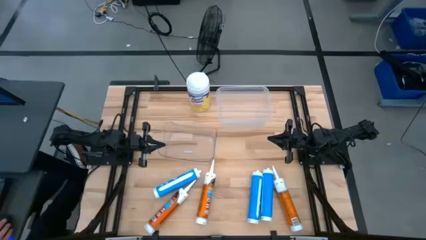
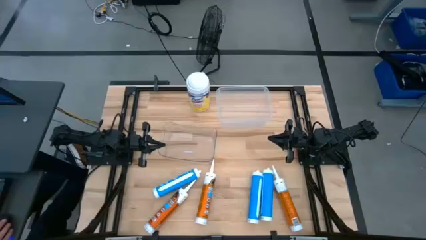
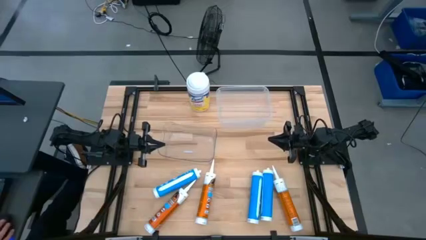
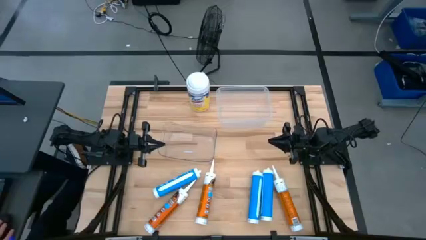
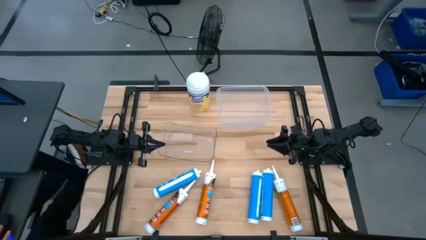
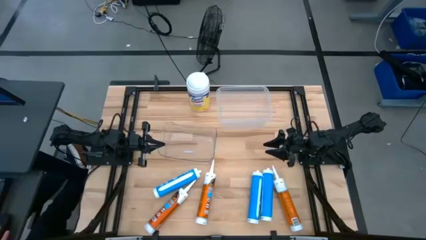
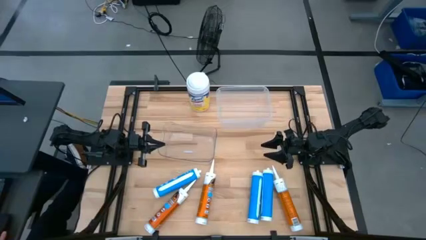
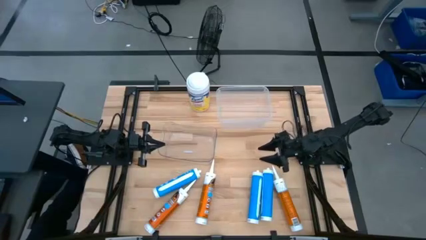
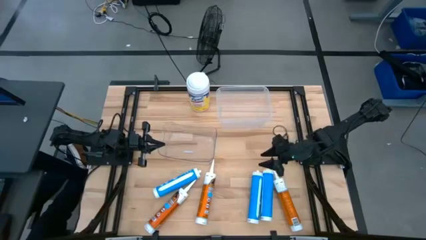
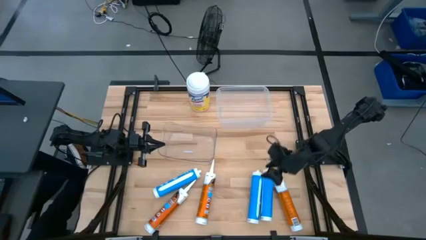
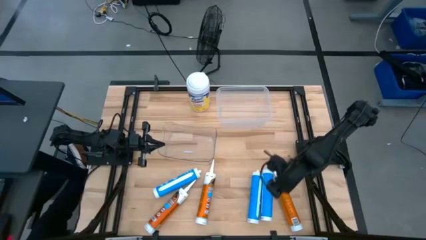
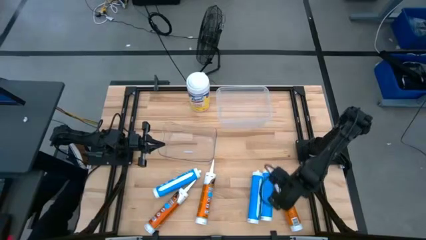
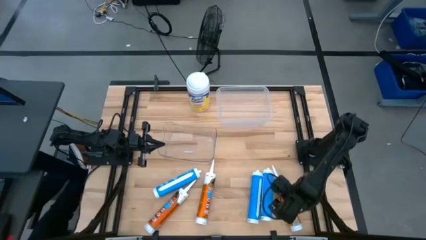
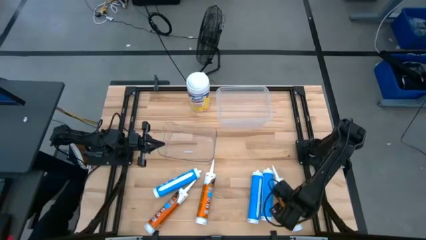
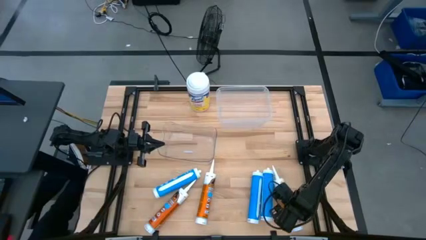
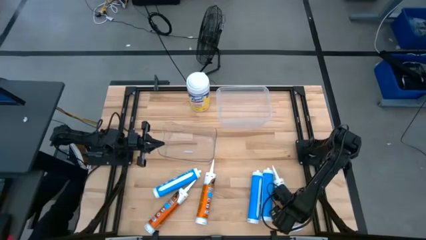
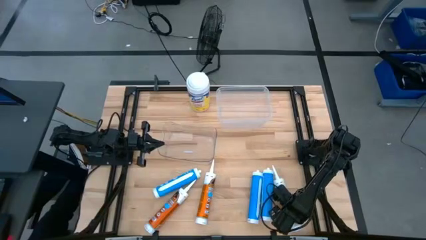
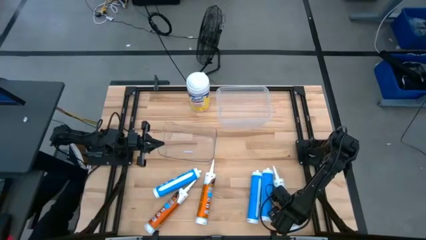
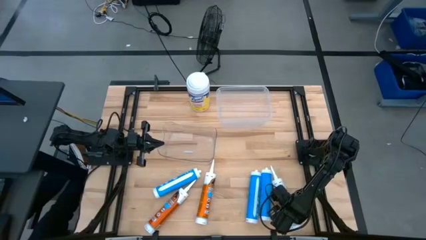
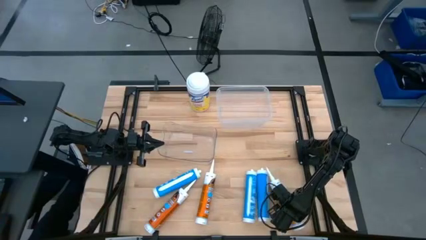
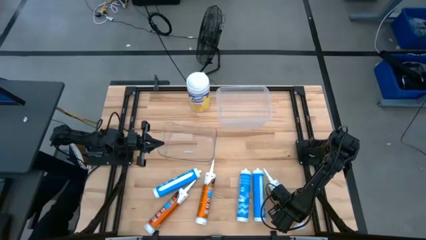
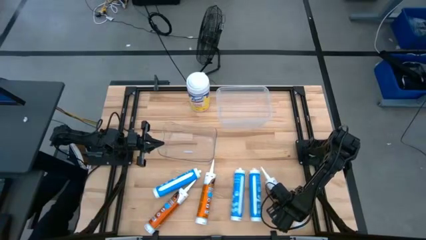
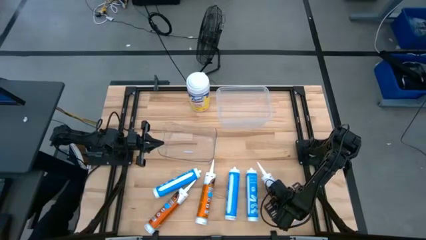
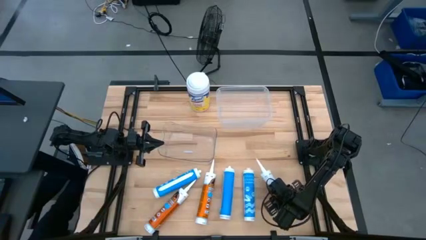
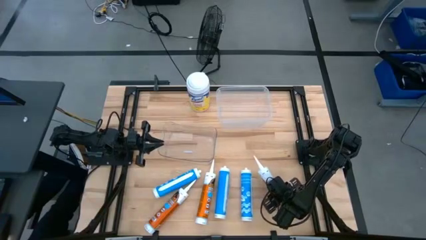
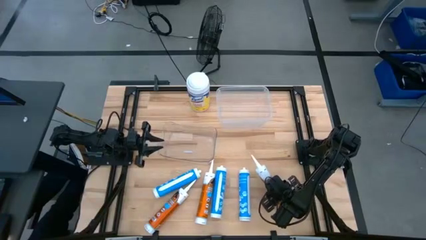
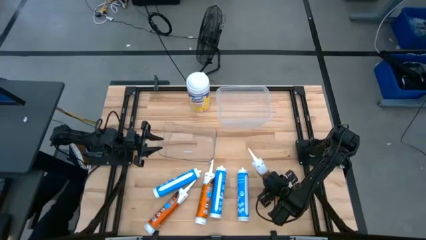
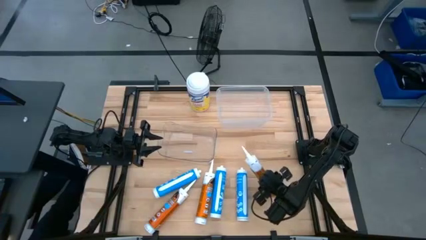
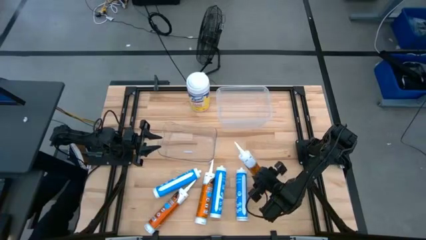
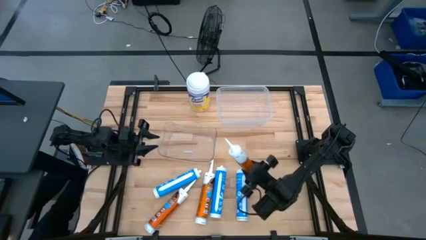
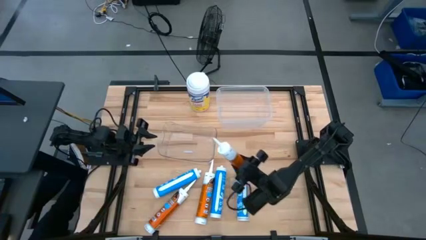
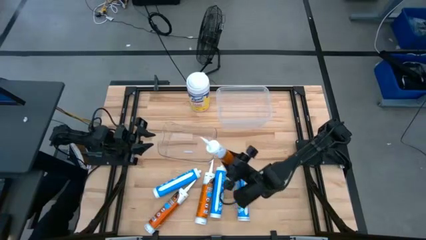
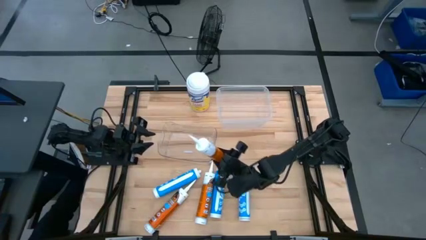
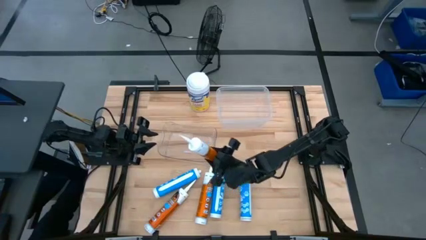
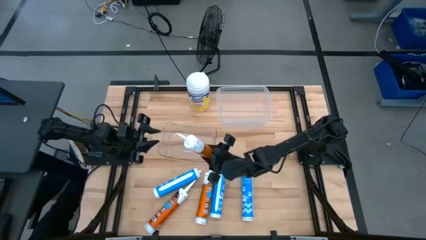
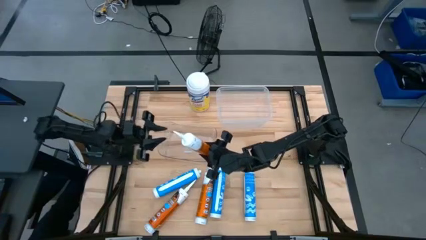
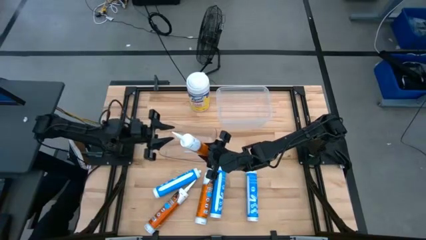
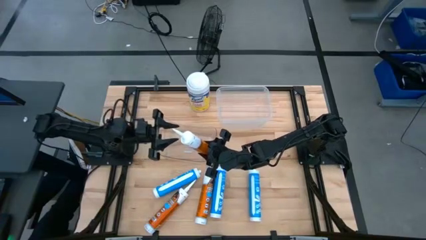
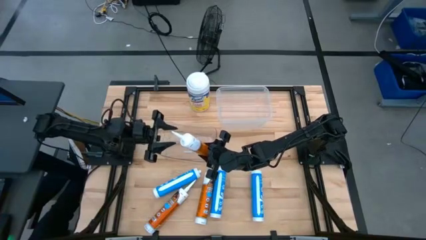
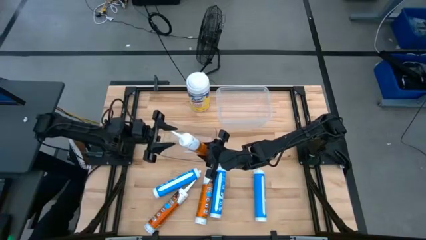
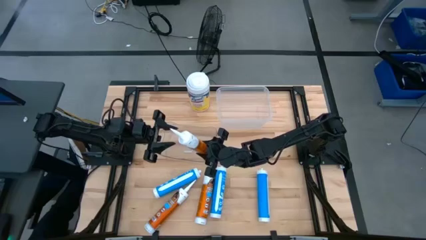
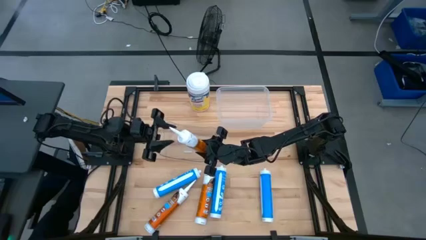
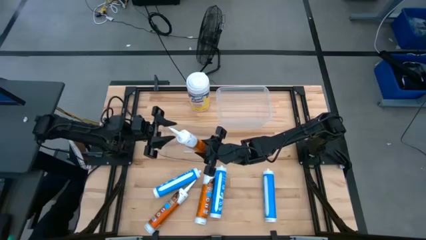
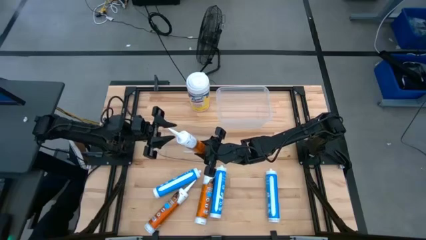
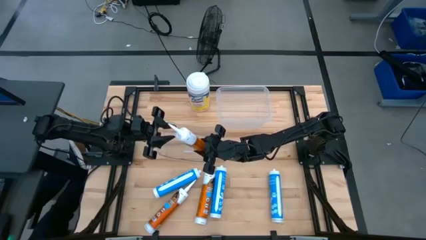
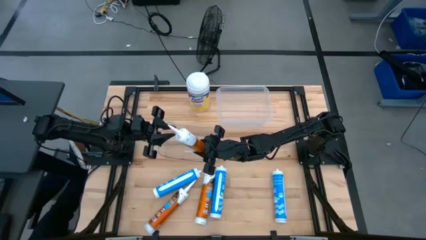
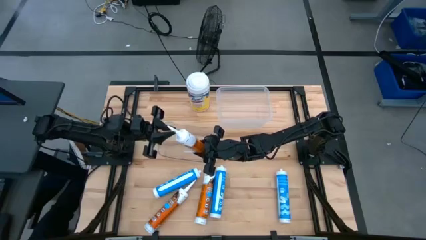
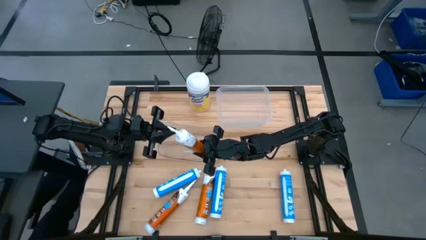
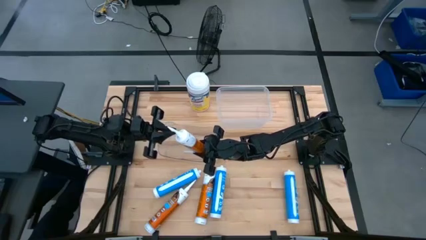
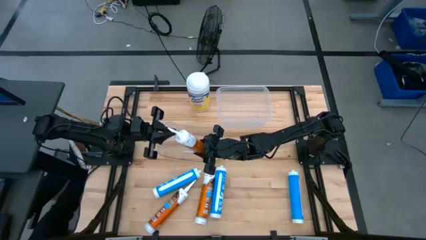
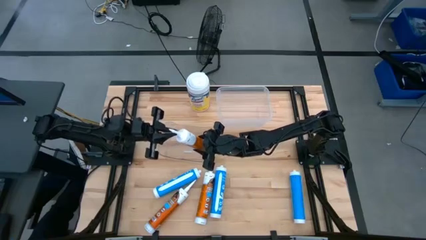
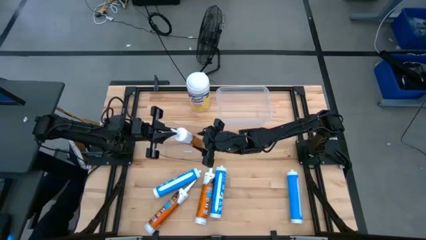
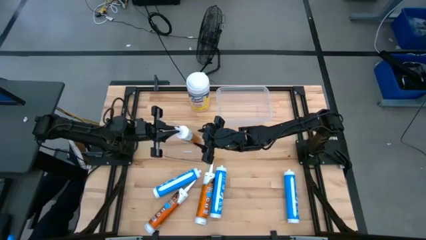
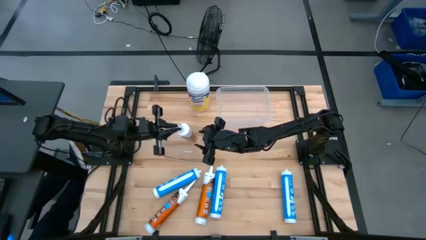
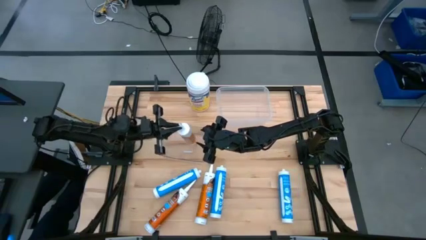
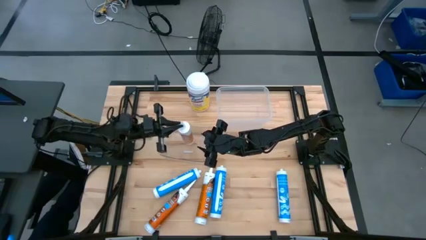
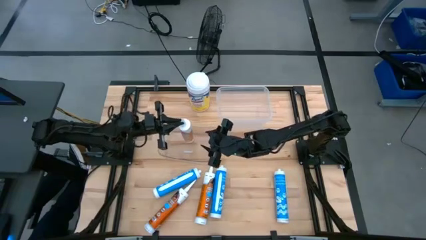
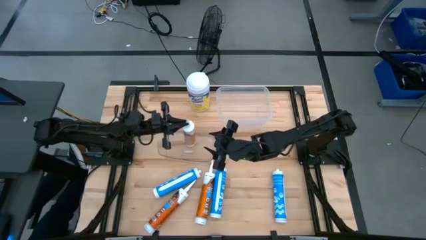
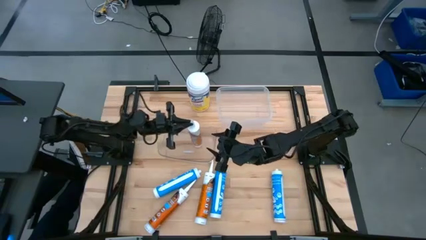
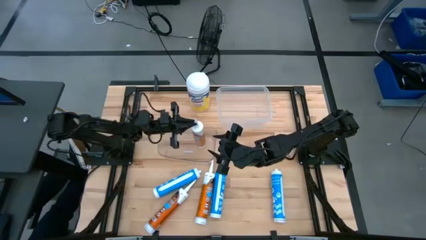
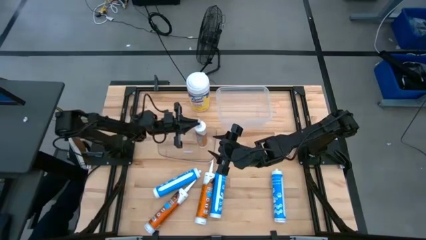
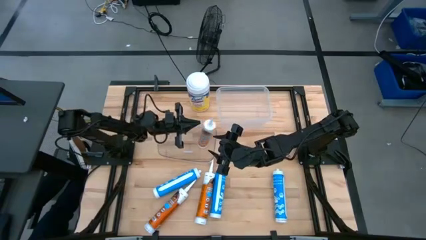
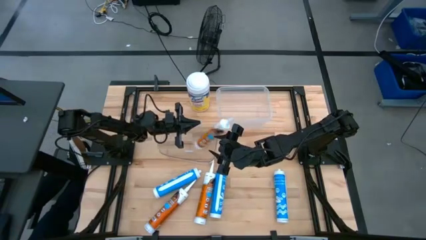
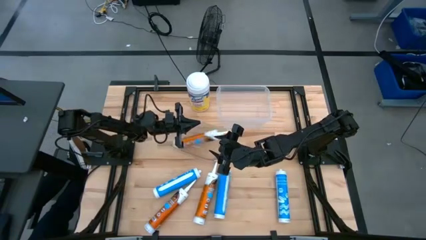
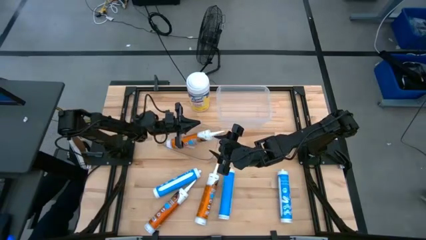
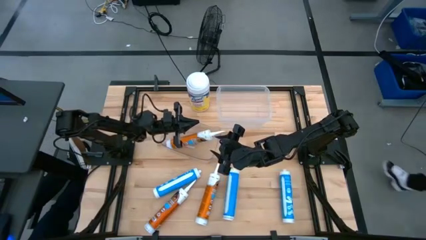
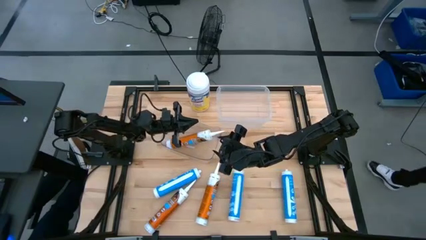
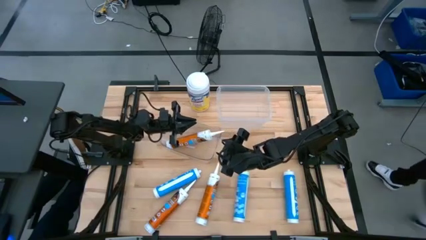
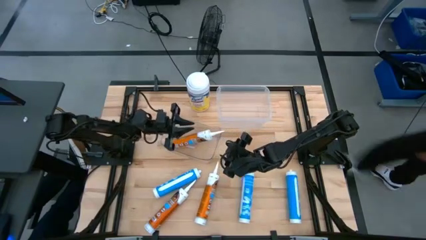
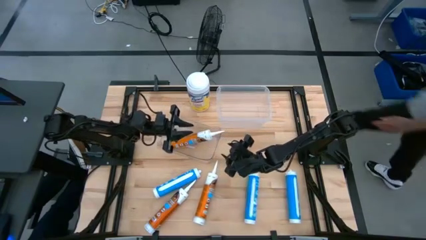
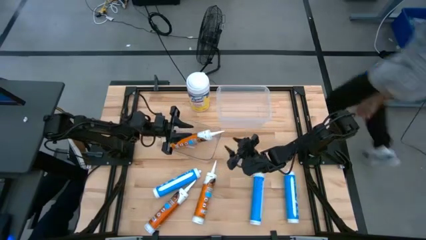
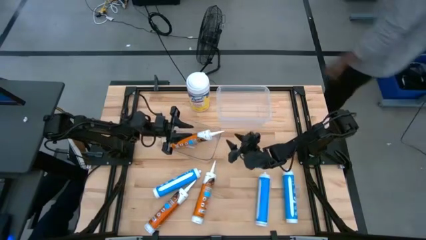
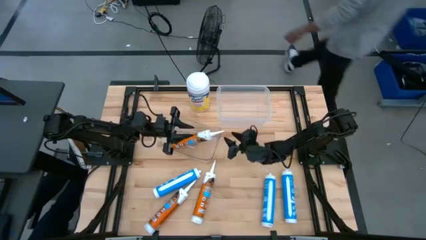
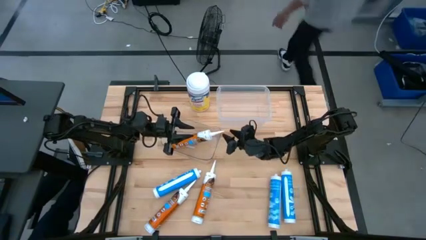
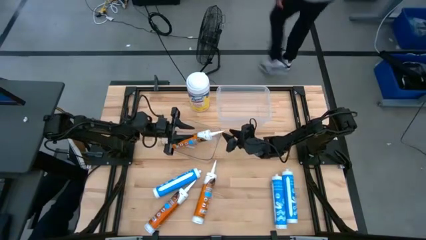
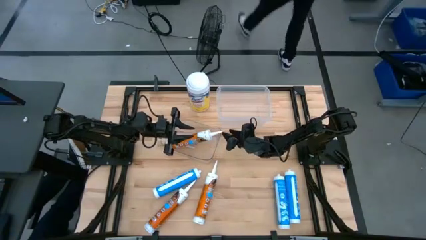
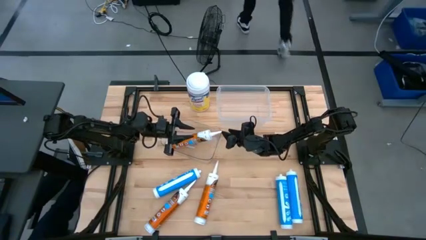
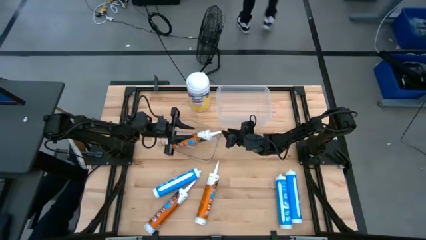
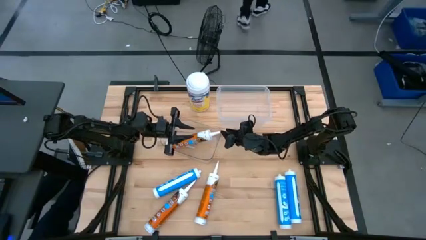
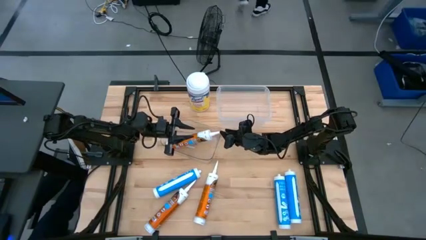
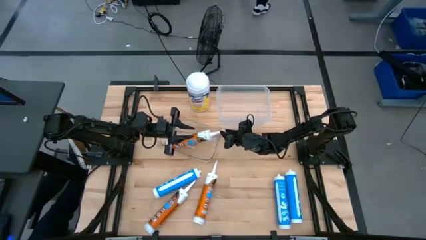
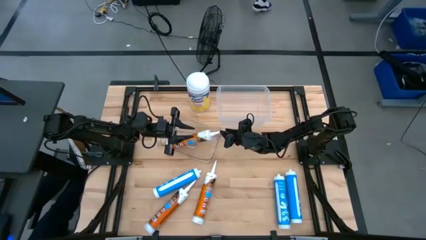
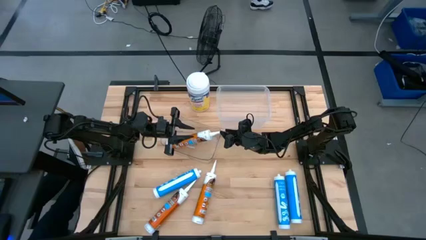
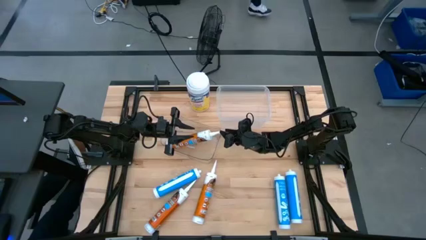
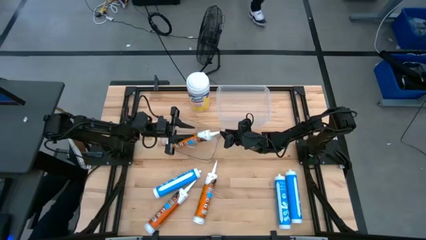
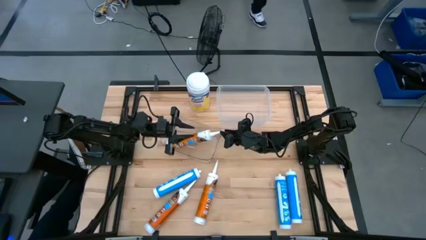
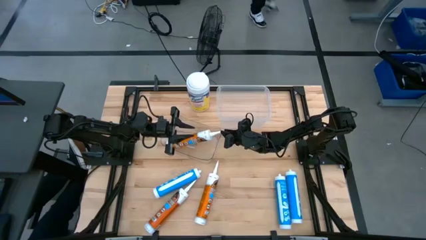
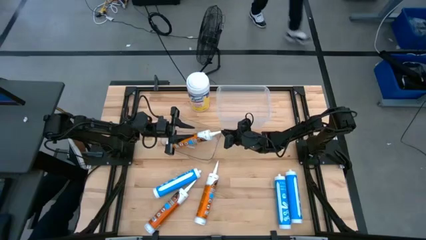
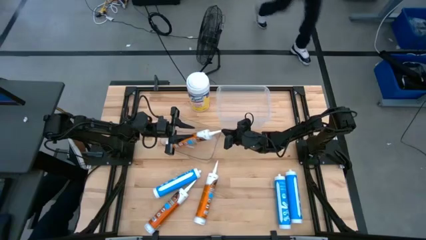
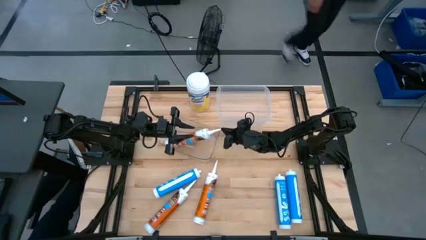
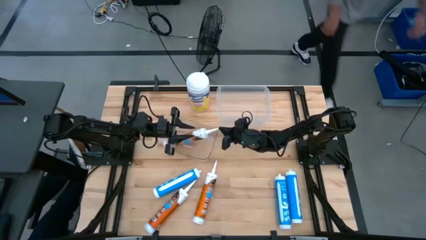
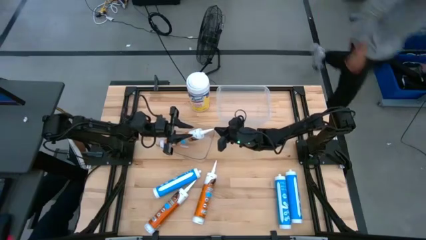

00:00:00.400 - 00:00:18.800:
Task: Pick & place silicon tubes, Sealant and Lysol wipes
Put the right orange sealant into the left transparent bin
